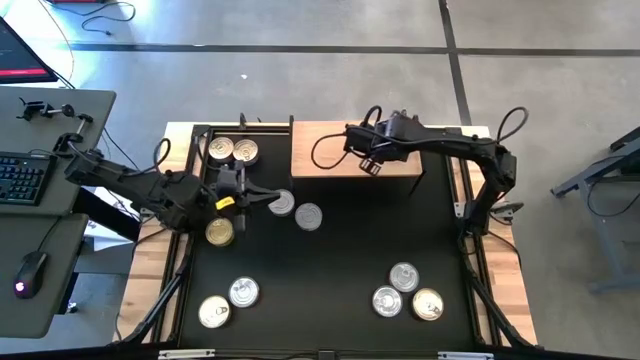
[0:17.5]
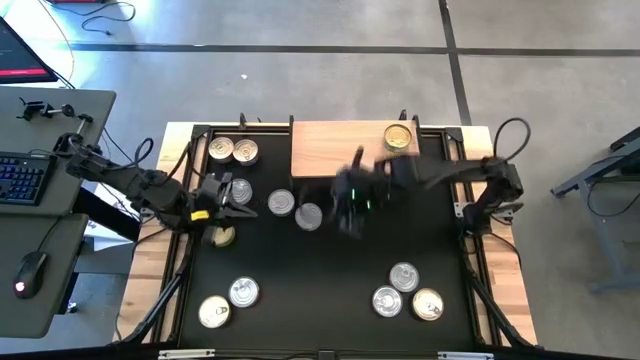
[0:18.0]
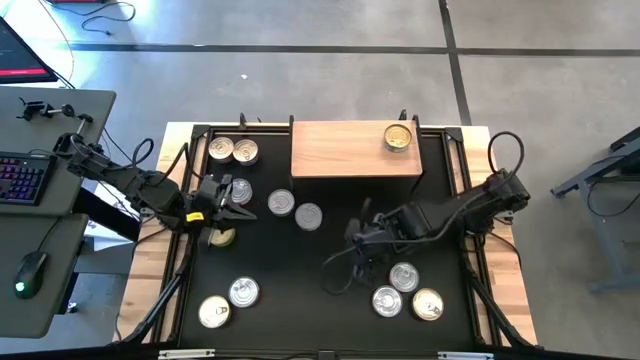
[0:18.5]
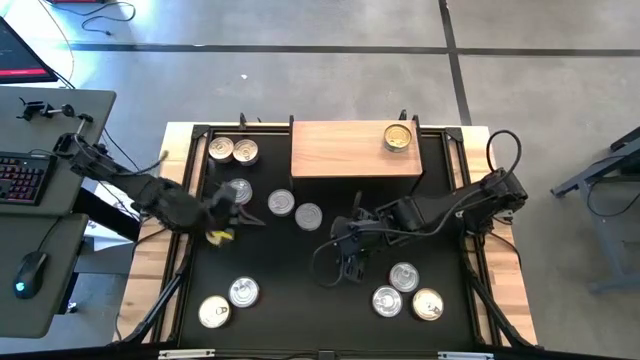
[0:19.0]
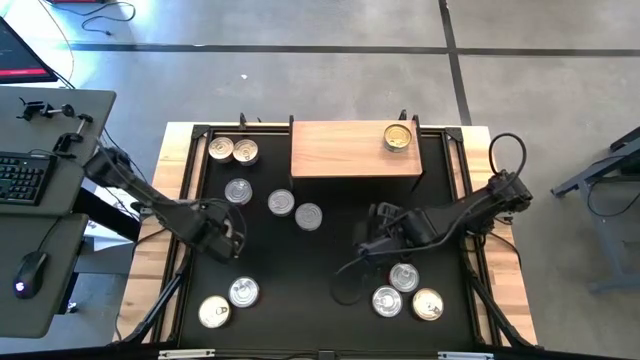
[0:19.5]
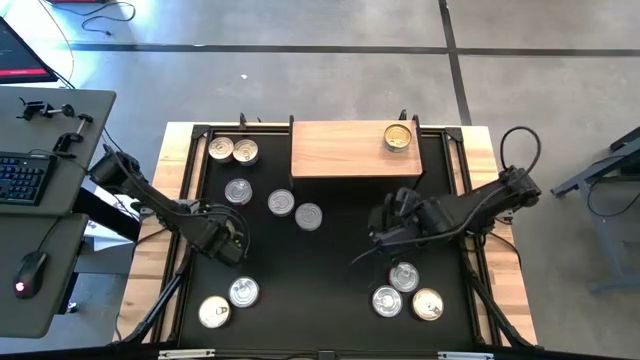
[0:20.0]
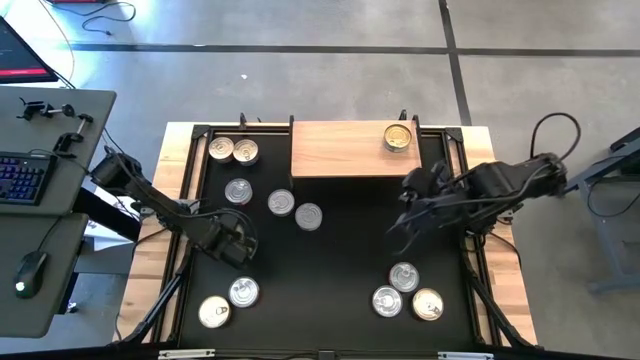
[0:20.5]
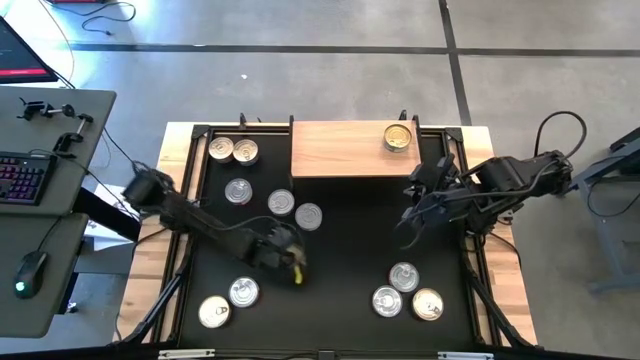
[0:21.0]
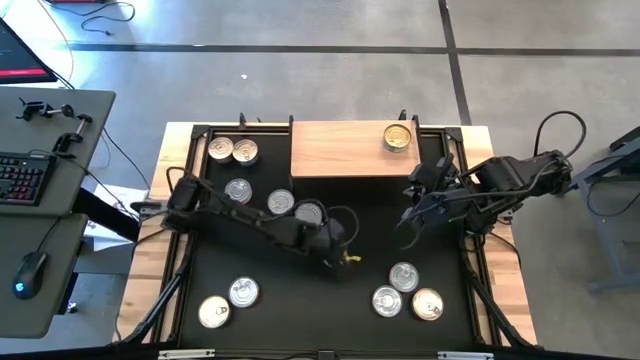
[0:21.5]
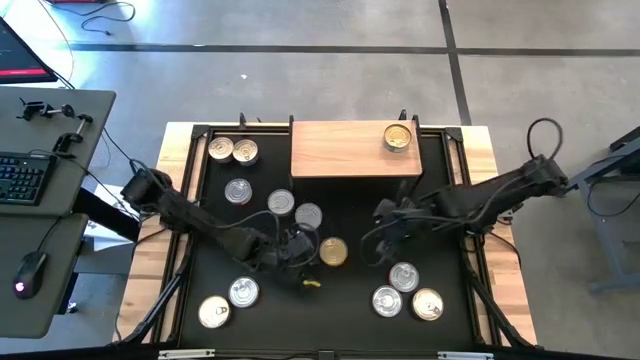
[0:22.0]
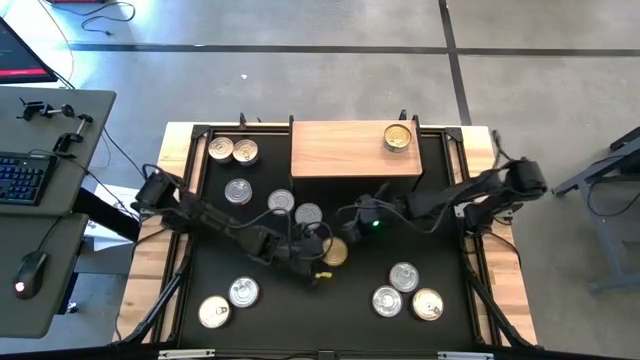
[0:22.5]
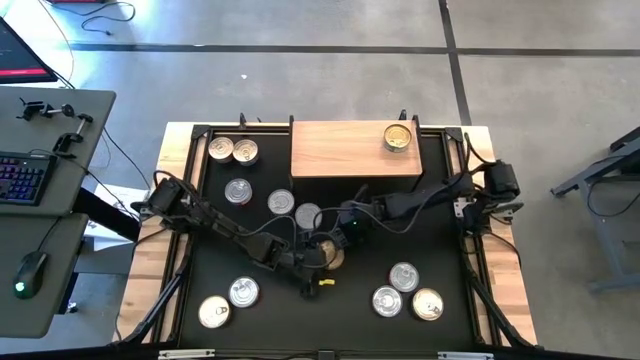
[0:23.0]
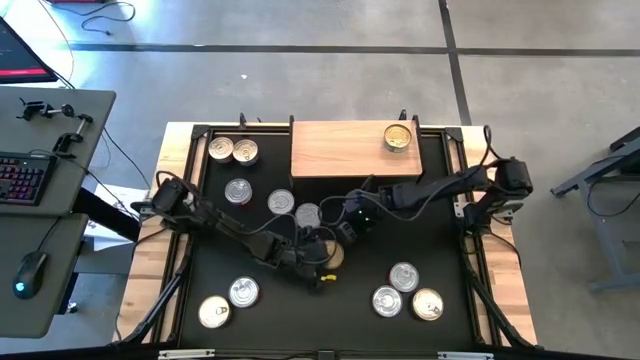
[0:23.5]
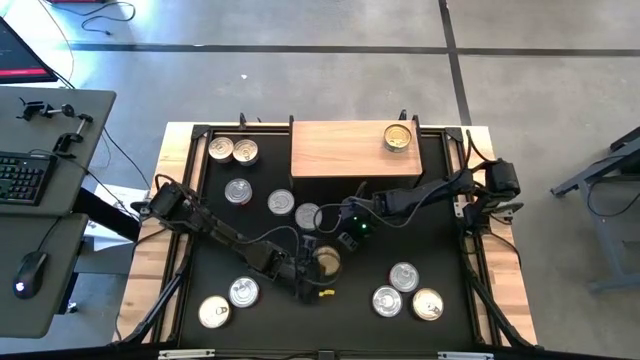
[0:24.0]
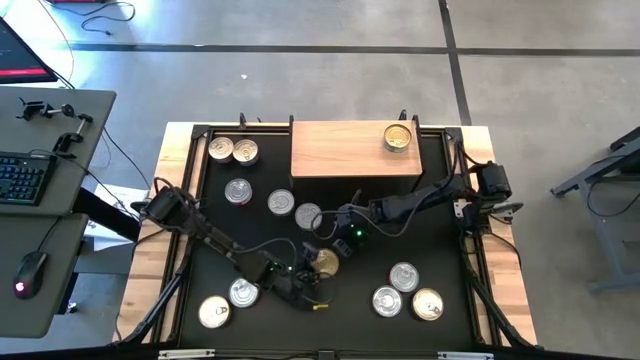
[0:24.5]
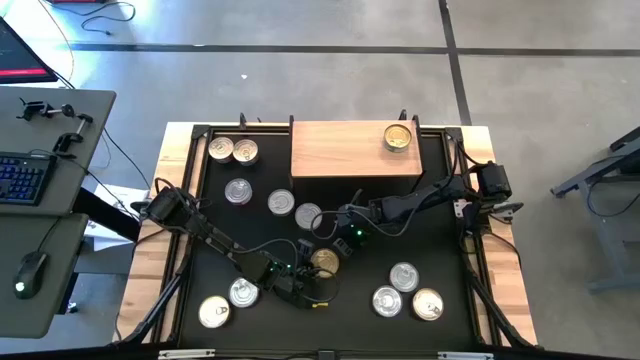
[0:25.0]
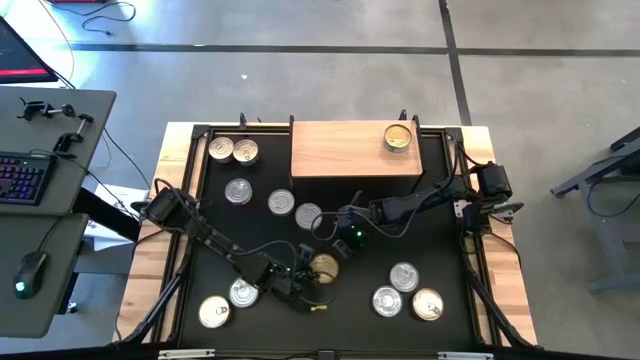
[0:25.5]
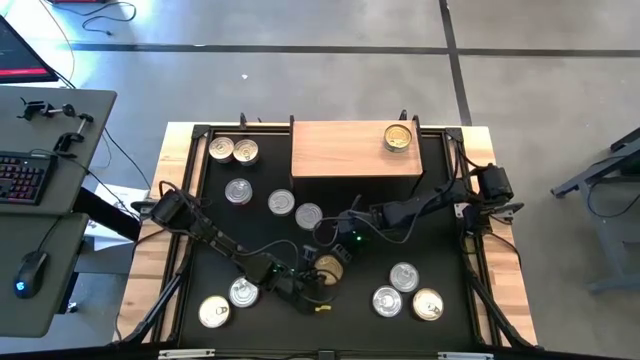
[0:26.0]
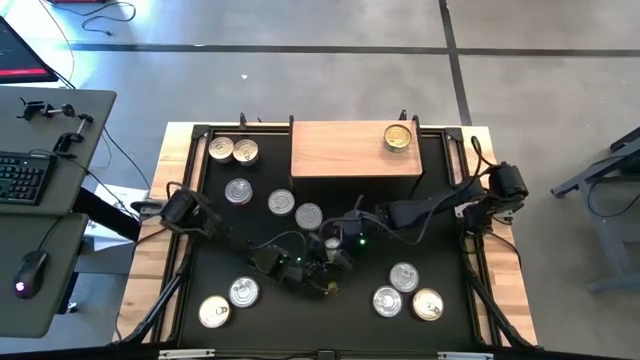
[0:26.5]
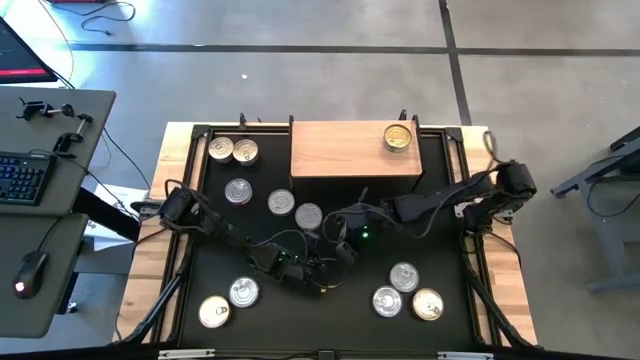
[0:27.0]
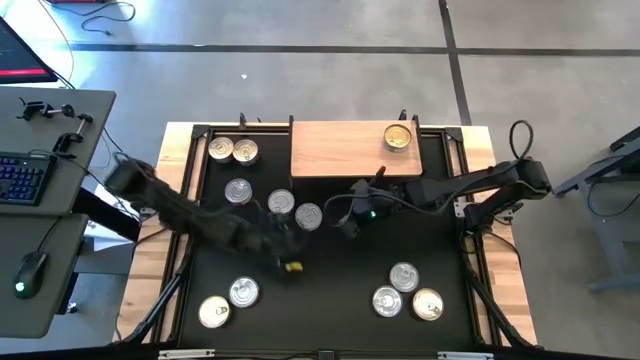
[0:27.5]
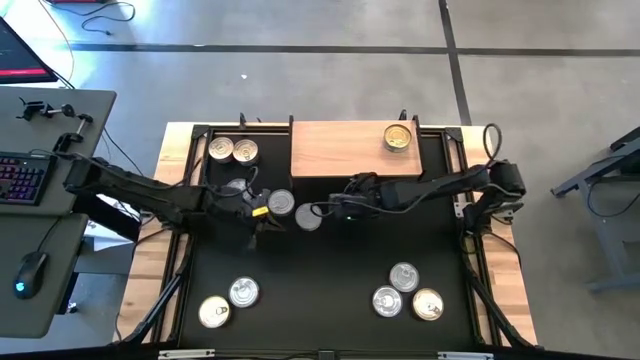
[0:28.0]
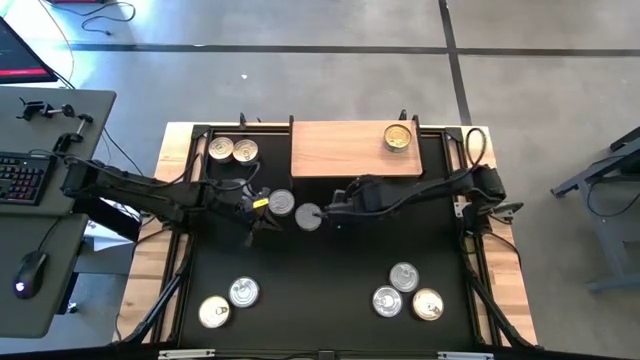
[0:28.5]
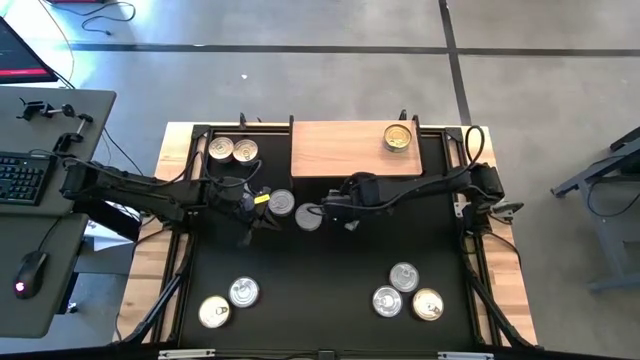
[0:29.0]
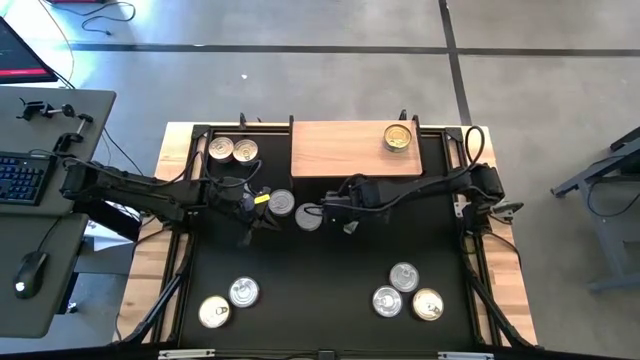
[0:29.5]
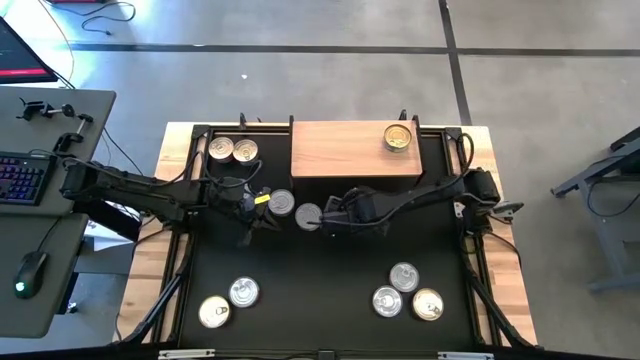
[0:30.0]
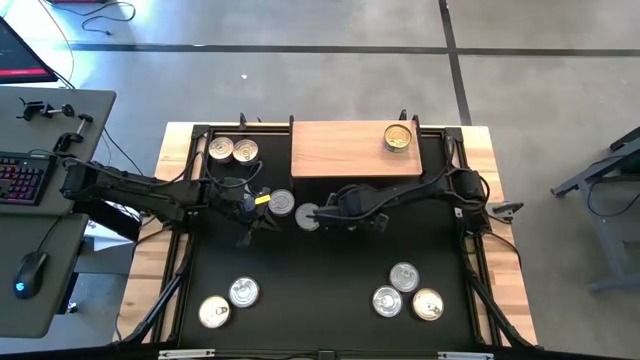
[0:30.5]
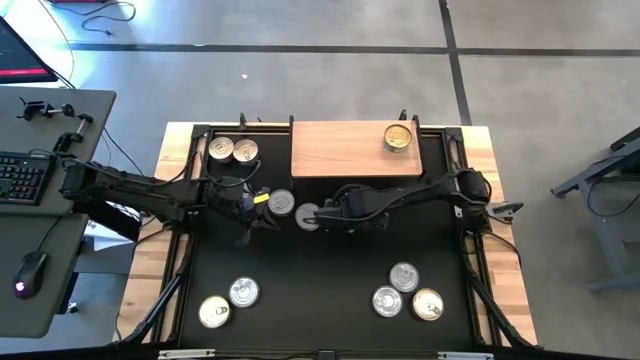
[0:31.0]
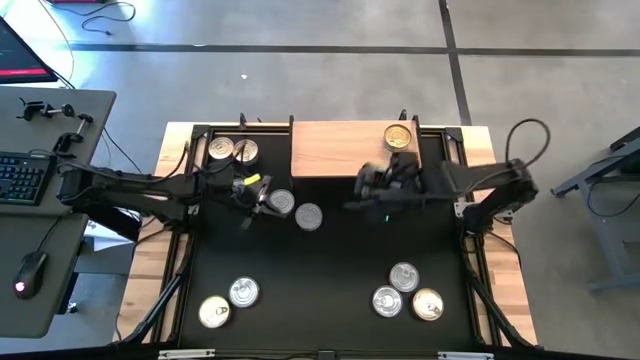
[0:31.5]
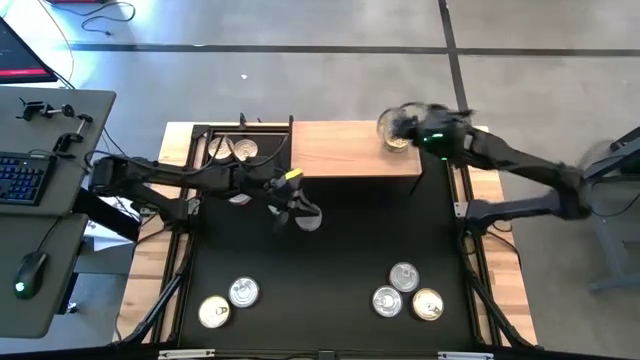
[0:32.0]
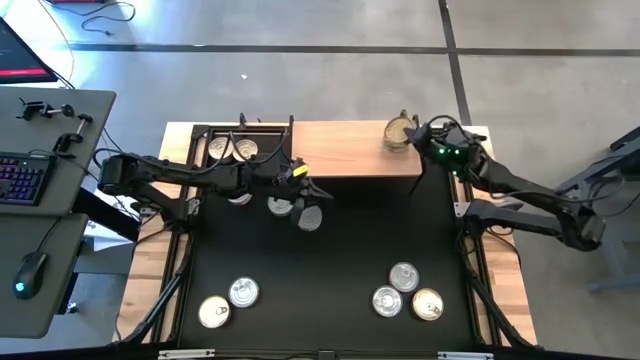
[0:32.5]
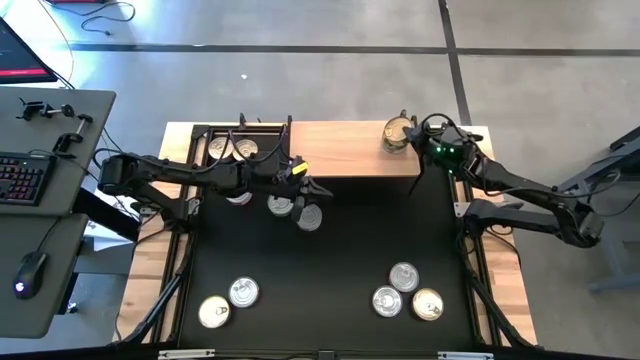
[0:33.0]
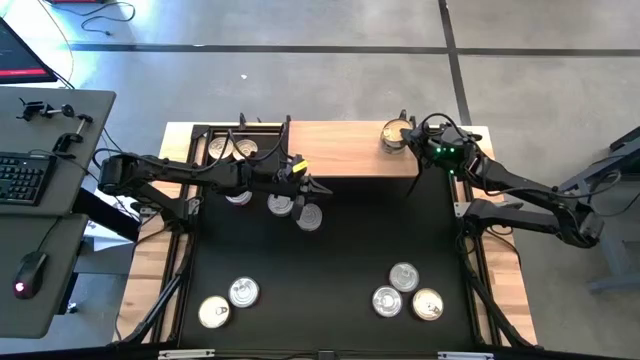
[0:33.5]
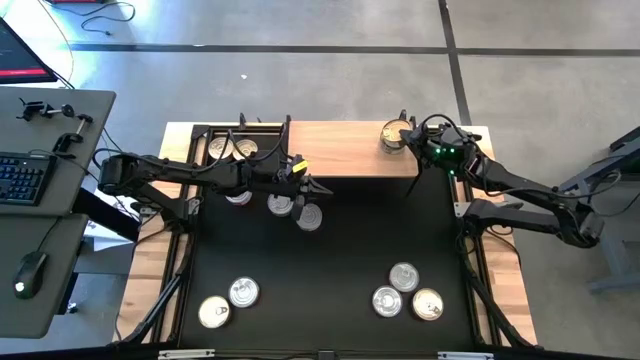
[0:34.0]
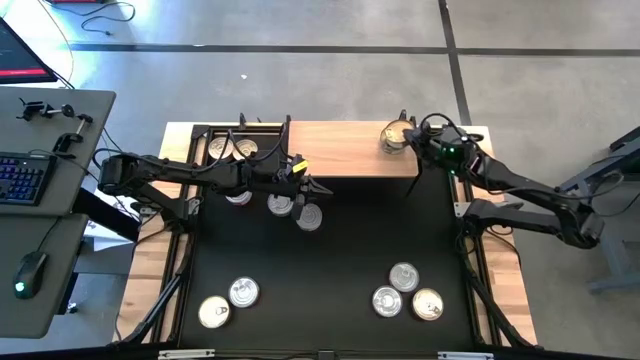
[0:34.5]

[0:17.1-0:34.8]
Task: Stack canned seafood by type on shelf
Stack the green tuna can on top of the green tuna can on the shelf
